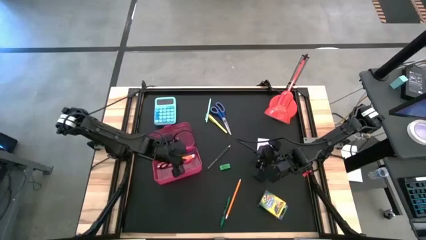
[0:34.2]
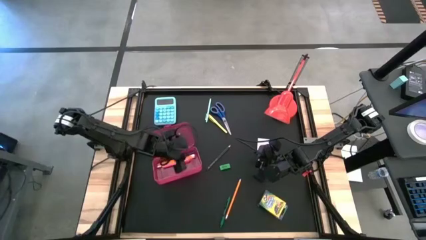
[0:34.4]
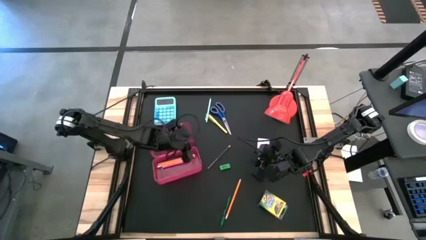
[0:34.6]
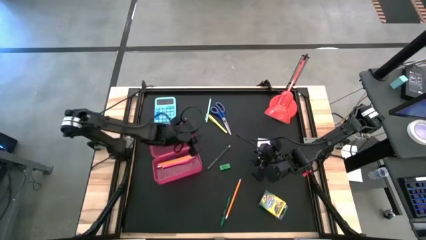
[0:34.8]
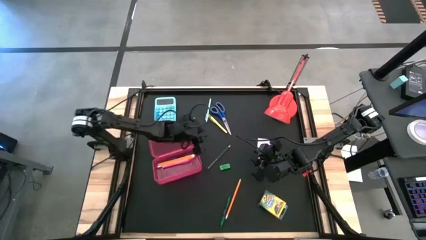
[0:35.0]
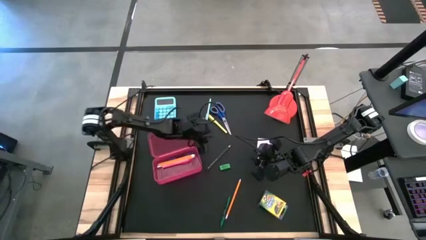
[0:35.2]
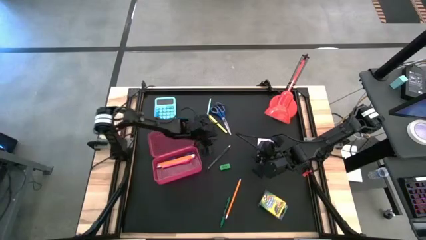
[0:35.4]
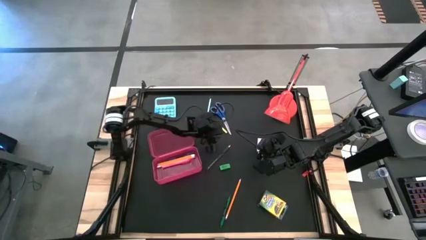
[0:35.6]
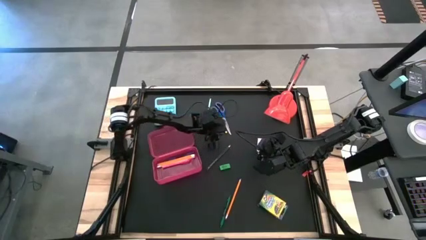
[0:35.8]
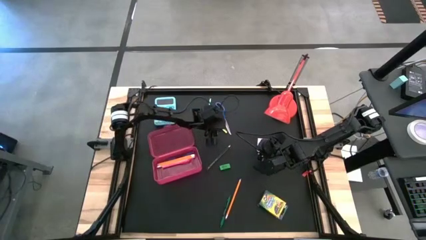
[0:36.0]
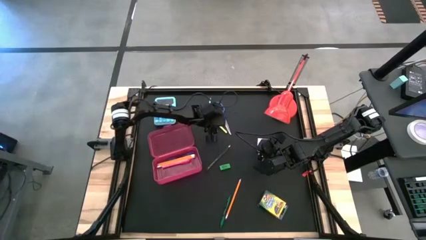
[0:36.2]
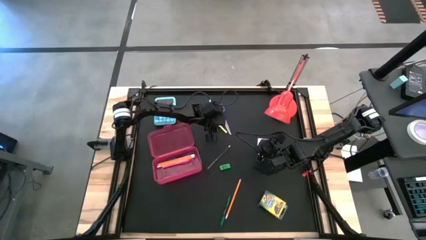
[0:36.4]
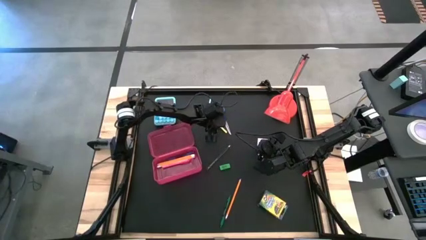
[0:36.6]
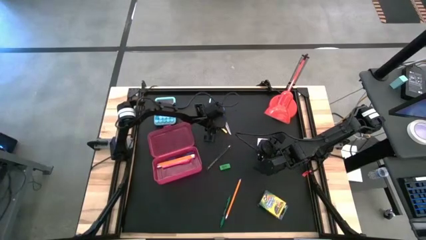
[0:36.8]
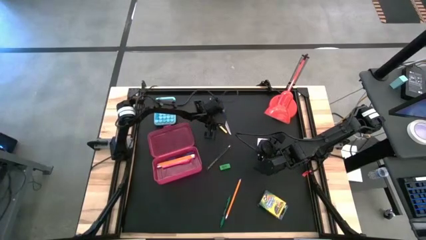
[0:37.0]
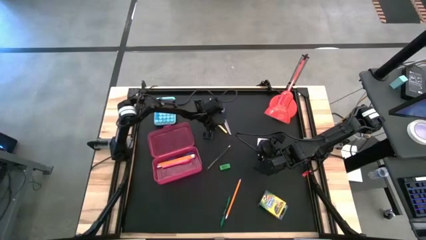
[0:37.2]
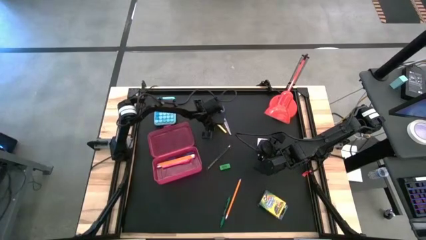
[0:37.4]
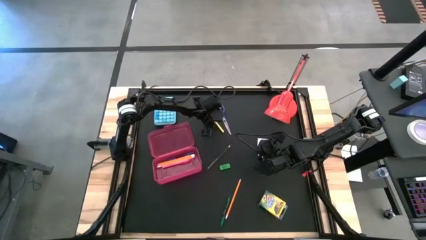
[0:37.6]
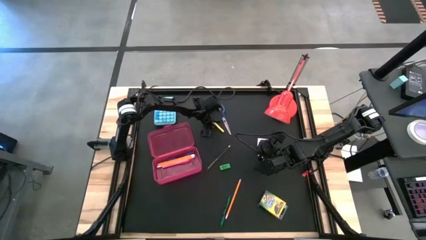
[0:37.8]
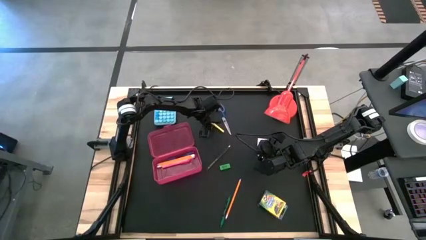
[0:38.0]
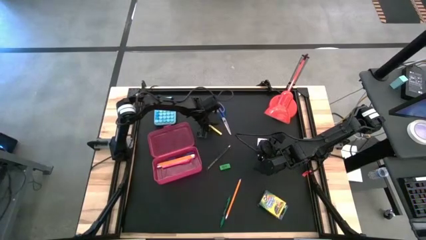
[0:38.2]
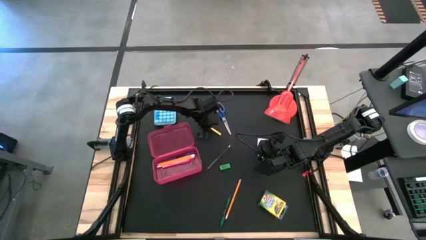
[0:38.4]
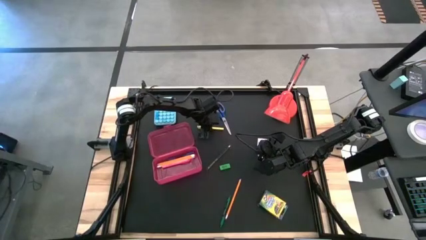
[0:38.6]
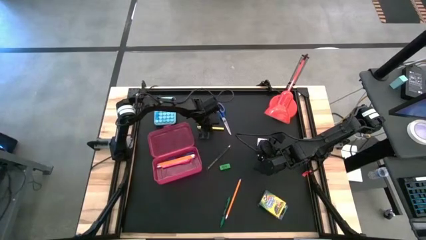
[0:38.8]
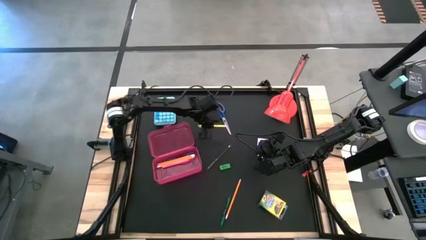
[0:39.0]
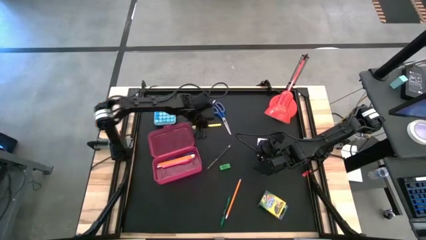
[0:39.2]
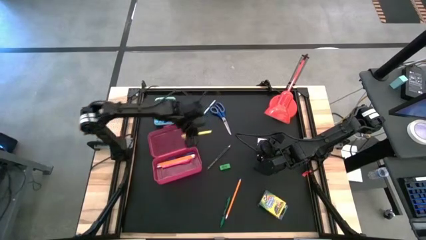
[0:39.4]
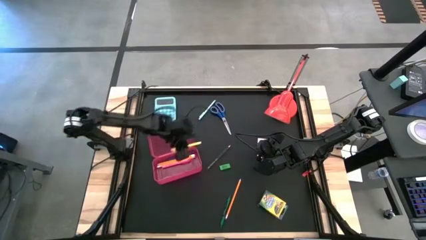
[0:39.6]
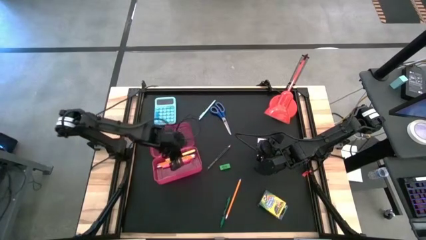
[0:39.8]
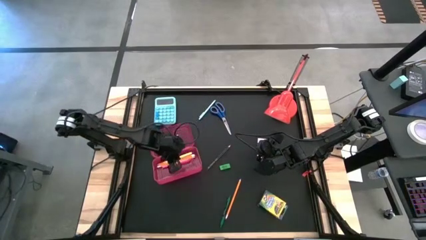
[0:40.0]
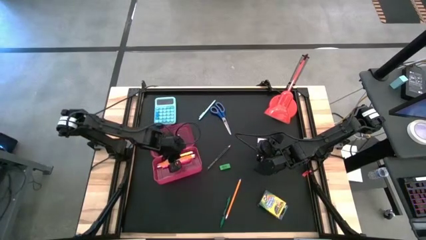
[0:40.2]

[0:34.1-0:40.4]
Task: Pack school essentials
Put the yellow pen into the pink supply box

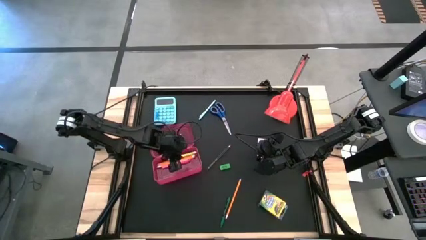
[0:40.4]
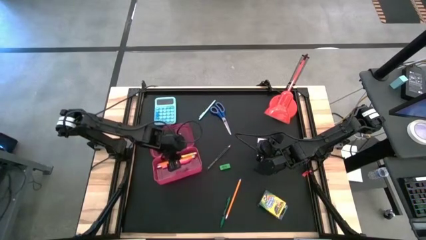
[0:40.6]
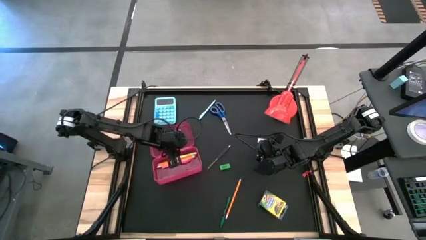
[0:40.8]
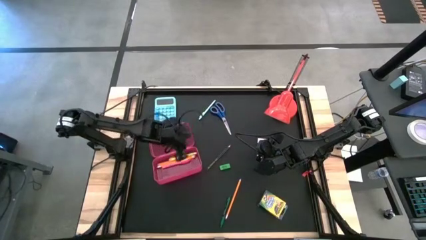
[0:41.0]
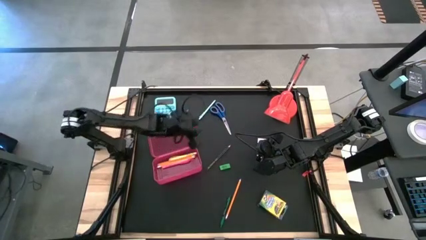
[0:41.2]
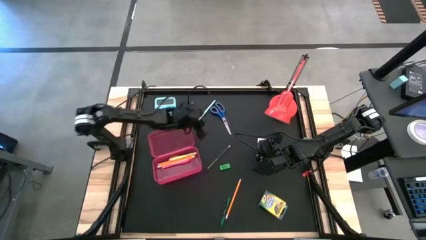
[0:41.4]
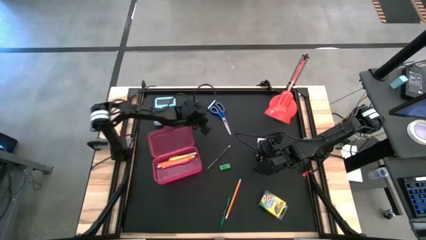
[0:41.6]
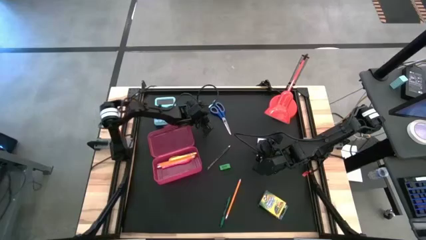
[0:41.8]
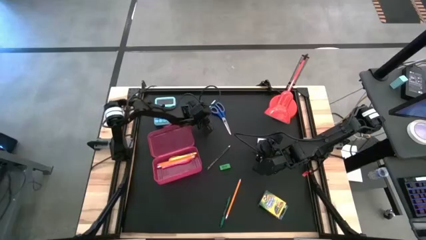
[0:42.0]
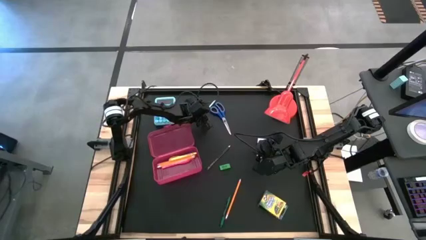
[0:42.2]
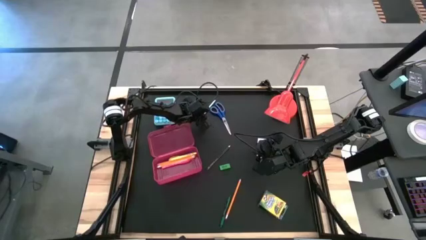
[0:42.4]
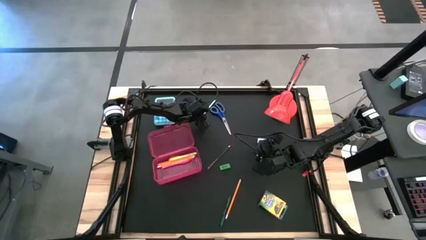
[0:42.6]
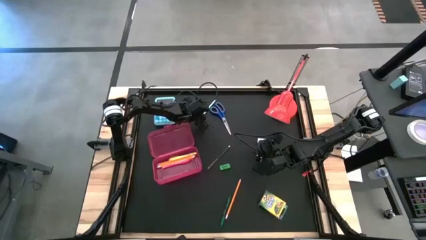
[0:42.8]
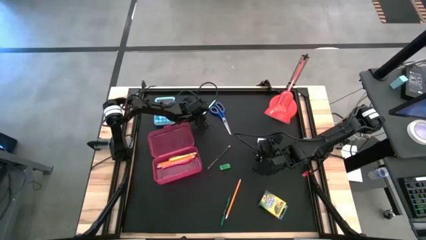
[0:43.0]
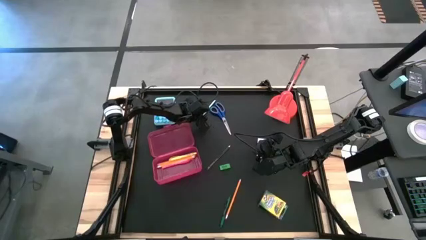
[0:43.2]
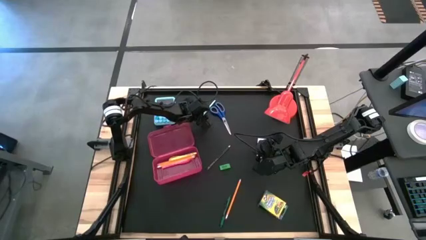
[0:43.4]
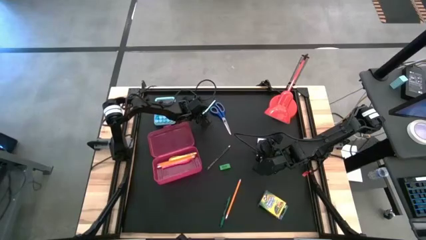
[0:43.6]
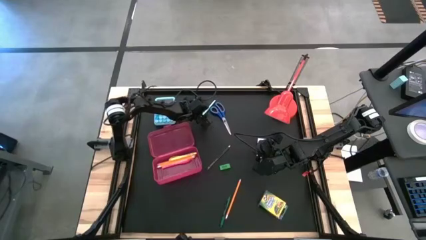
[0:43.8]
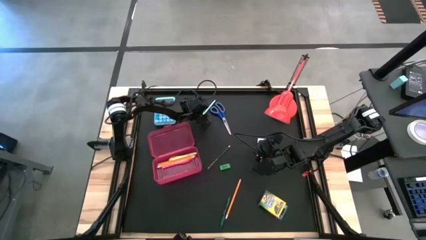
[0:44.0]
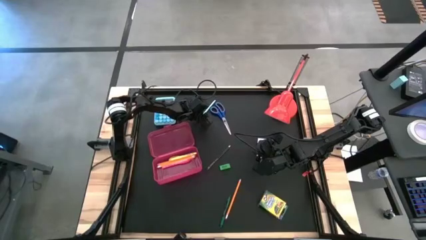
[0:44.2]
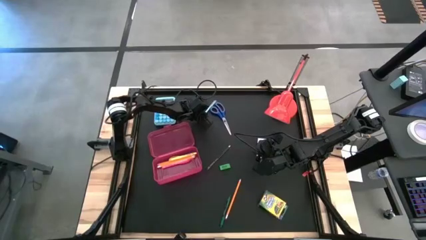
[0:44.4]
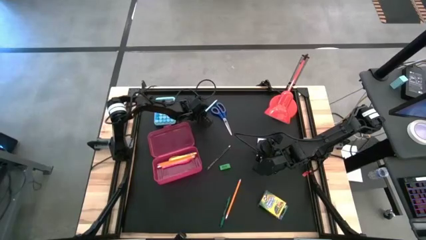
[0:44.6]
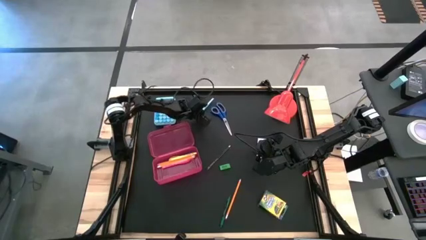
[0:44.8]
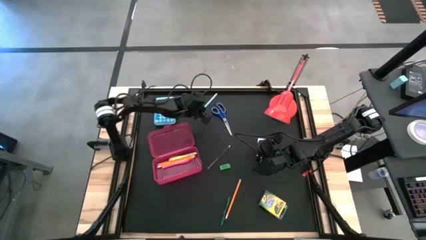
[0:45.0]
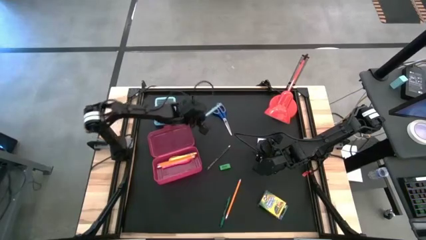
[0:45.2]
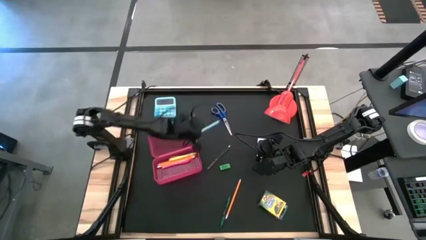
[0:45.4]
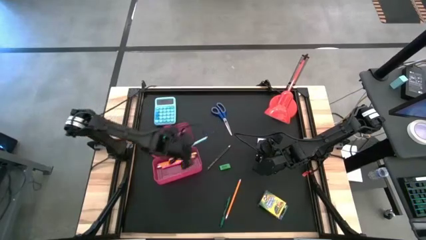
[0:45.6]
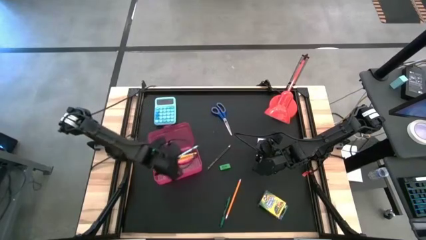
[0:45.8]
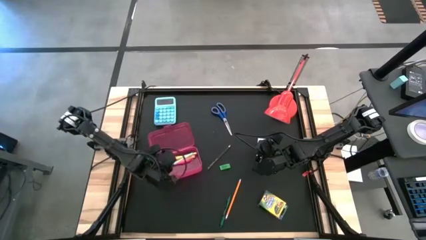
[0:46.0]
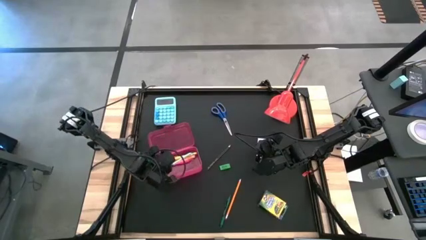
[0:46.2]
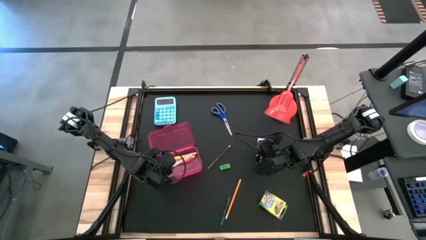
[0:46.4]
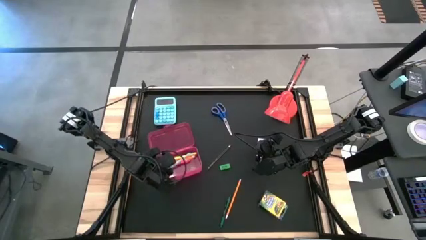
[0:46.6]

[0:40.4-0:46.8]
Put the light blue mechanical pencil into the pink supply box

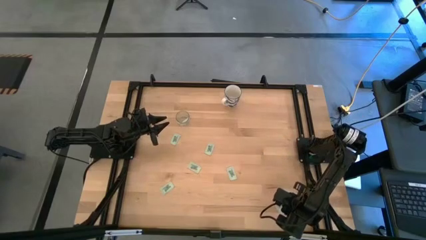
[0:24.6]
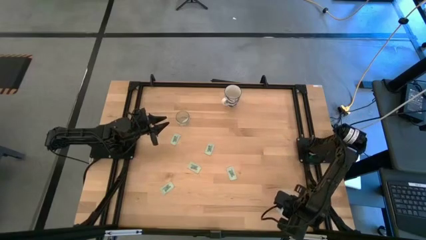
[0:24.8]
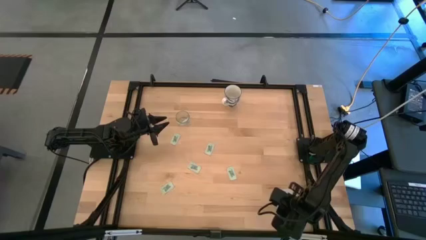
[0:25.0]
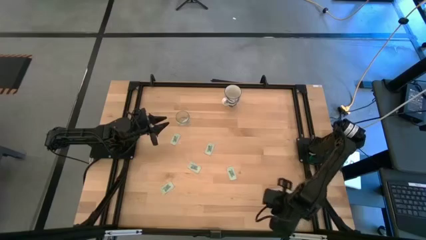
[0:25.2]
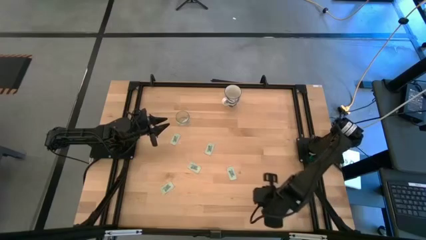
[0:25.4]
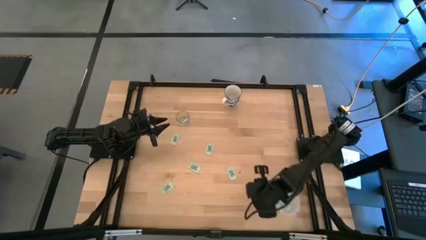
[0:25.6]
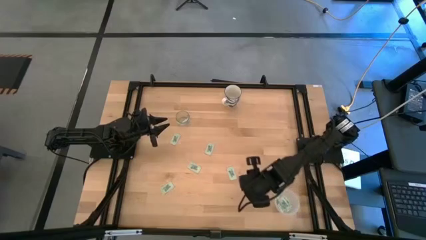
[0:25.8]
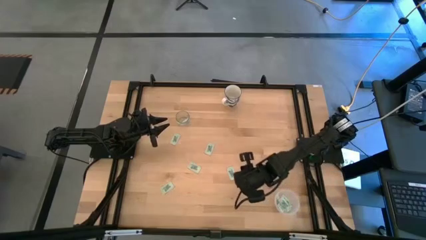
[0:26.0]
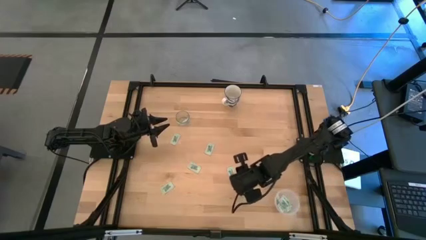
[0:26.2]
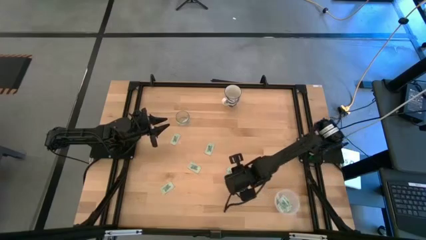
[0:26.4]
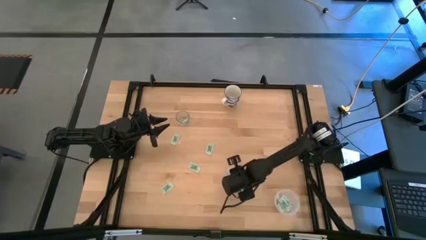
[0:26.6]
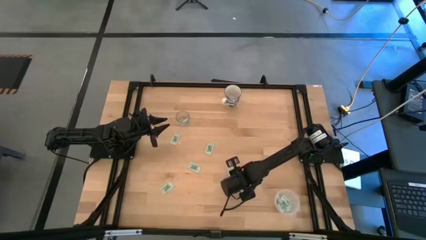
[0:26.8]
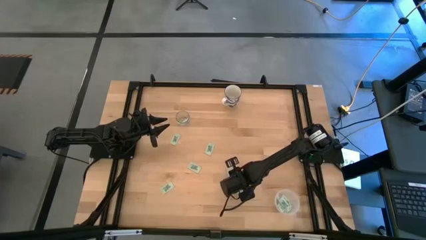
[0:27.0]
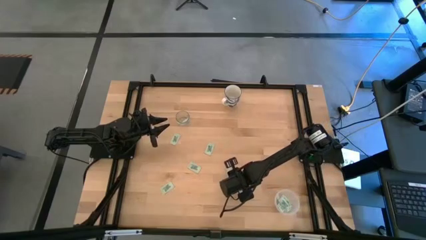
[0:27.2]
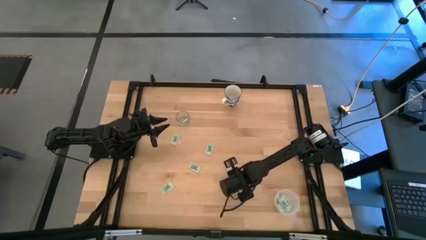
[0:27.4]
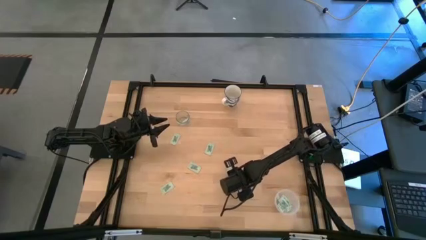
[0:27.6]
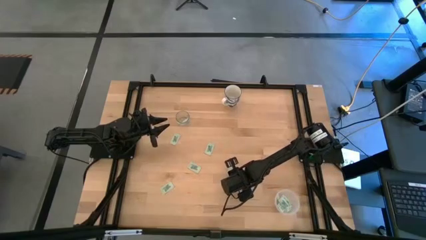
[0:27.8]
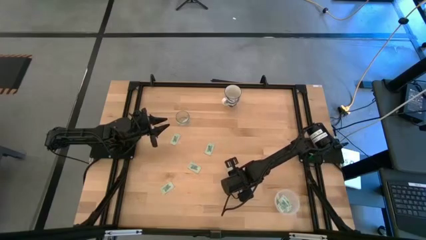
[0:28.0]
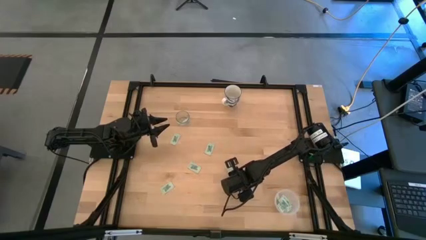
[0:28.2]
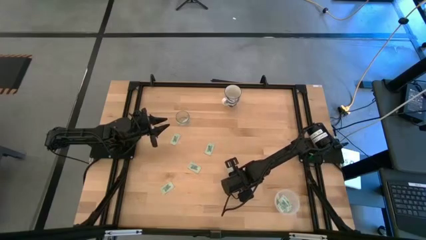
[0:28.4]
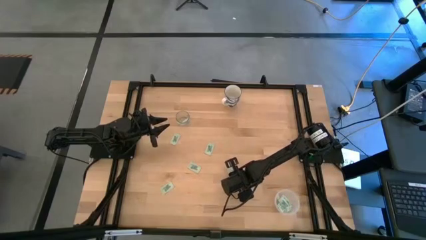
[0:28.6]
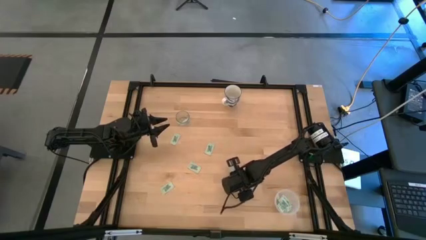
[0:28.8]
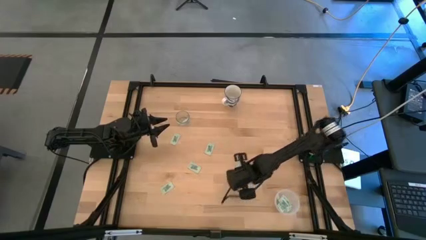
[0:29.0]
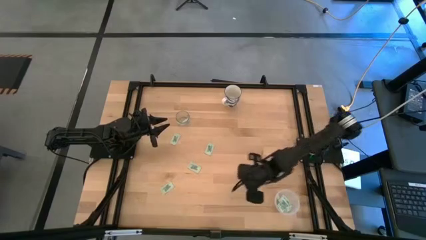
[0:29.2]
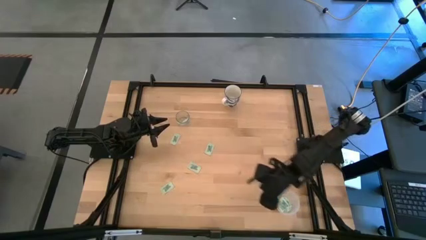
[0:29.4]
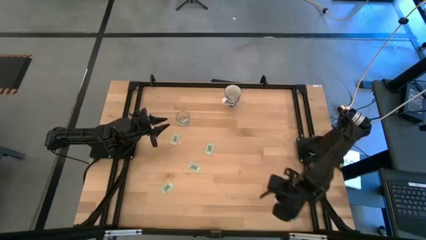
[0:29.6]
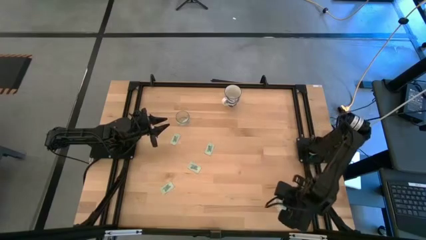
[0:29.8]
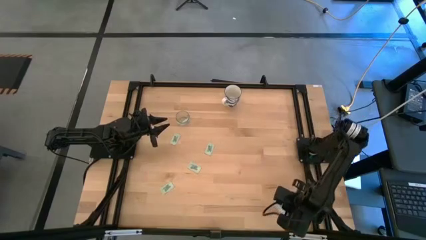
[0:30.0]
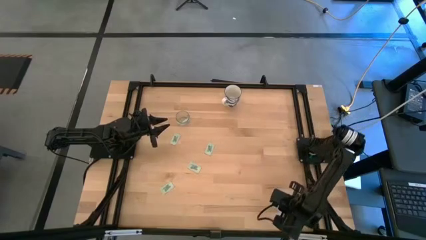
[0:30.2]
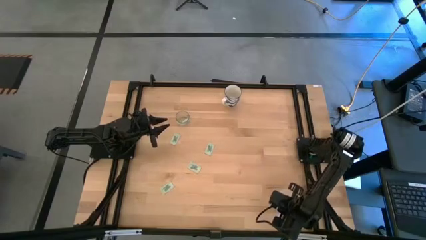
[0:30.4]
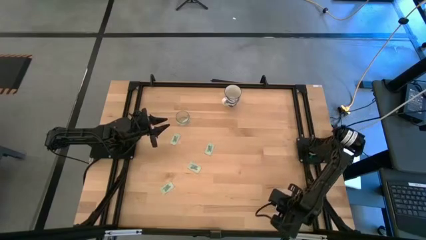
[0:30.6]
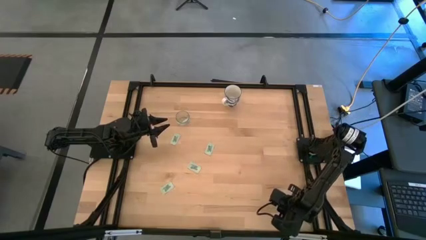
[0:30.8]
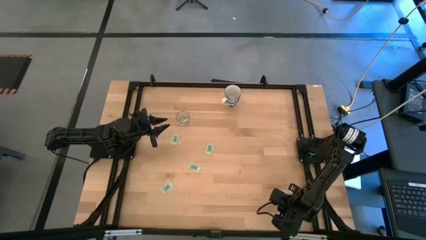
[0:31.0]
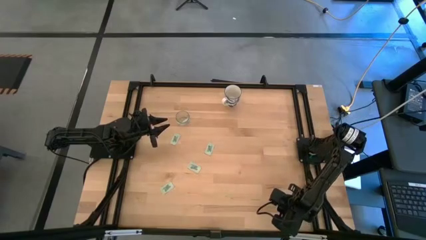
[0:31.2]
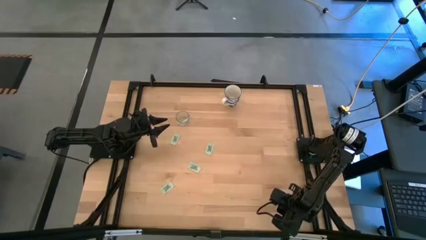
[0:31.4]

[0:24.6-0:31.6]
Task: Pick and place Stevia / Truvia into bins
Put the green stevia packet into the transparent container
